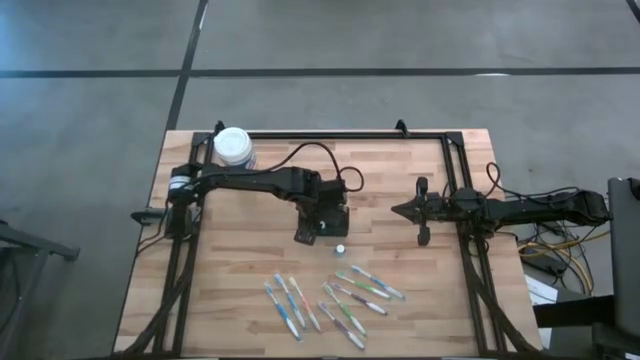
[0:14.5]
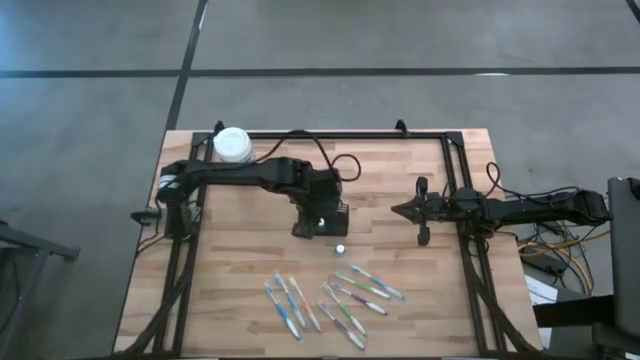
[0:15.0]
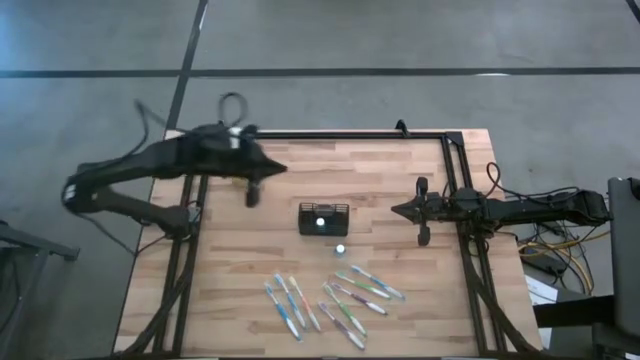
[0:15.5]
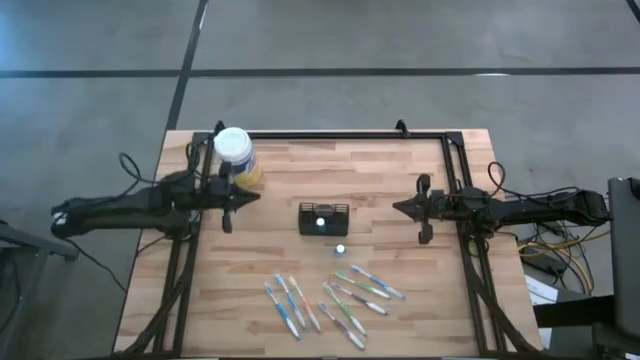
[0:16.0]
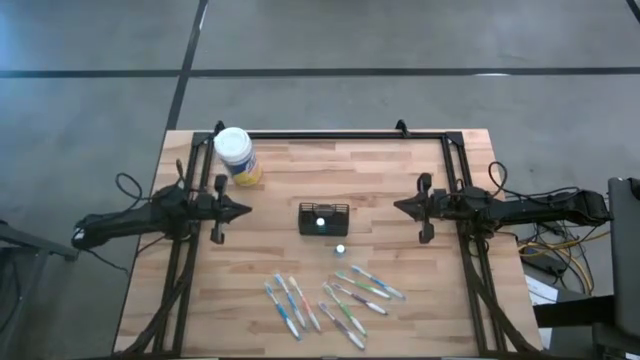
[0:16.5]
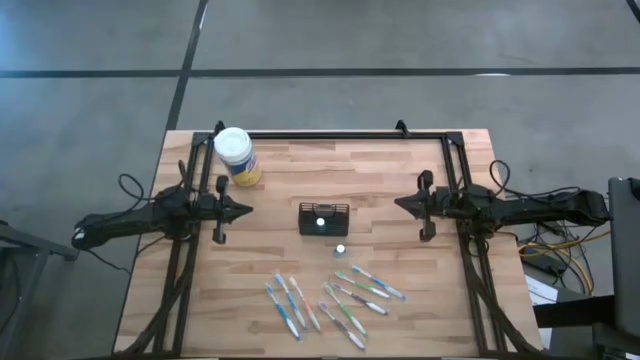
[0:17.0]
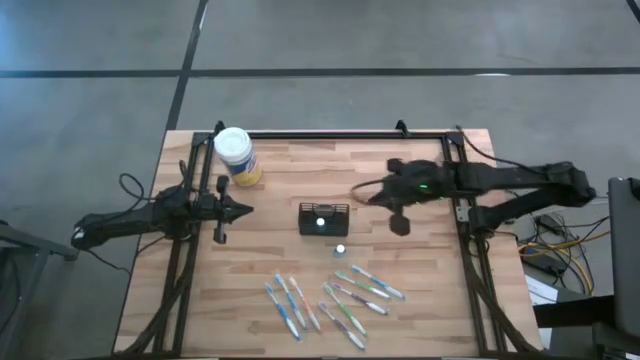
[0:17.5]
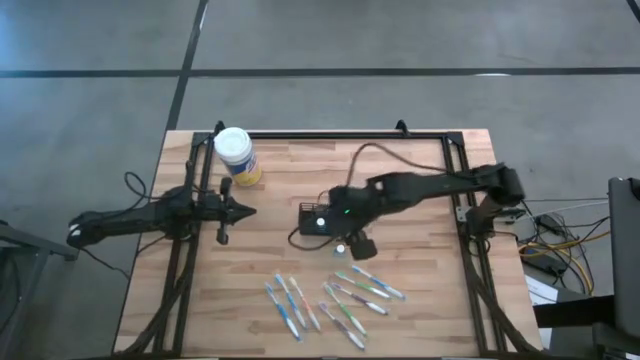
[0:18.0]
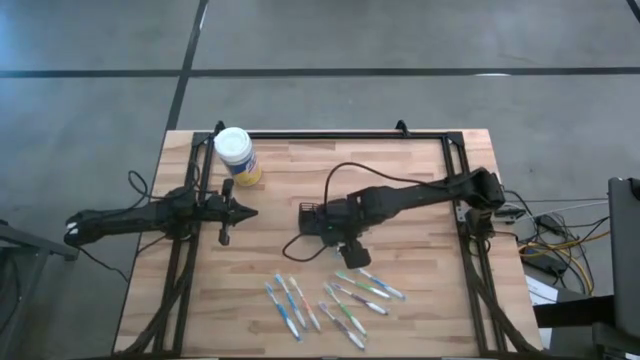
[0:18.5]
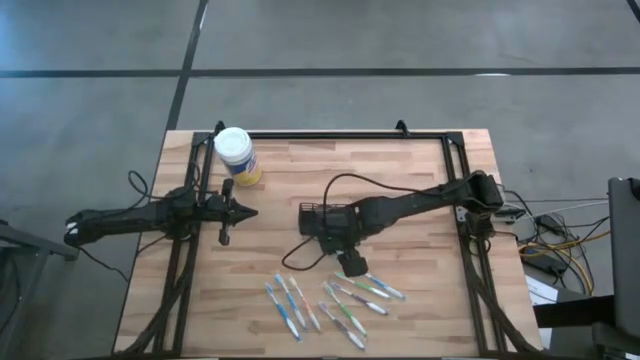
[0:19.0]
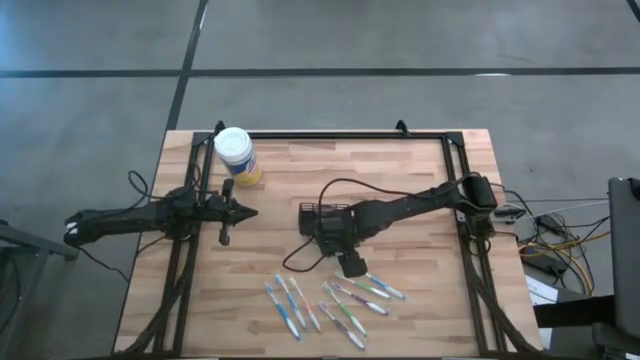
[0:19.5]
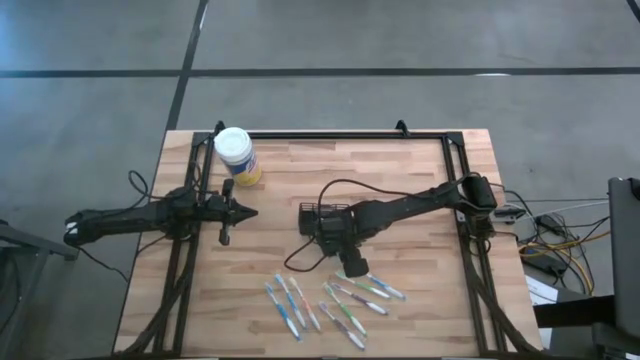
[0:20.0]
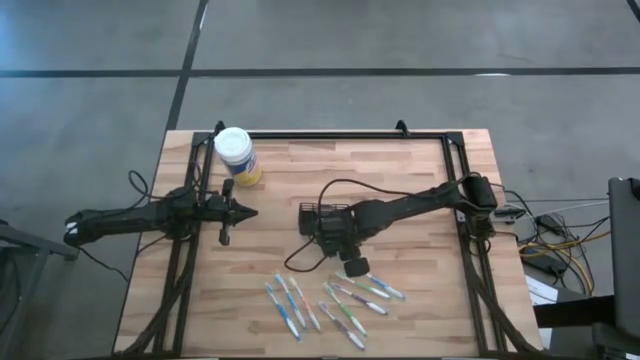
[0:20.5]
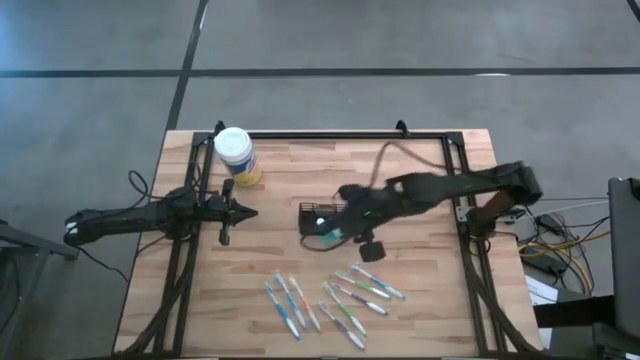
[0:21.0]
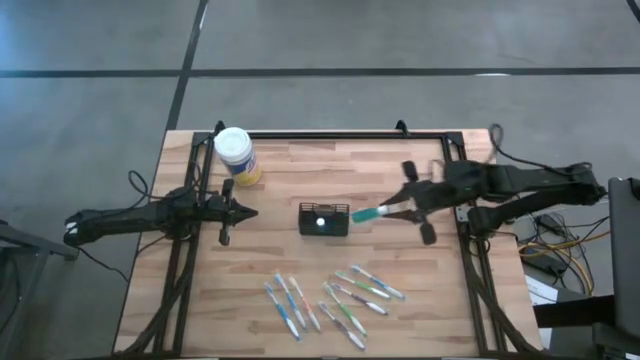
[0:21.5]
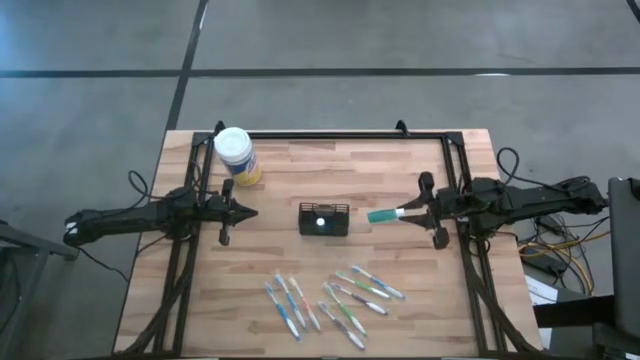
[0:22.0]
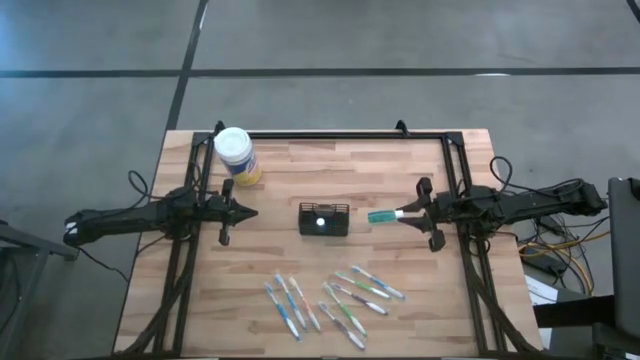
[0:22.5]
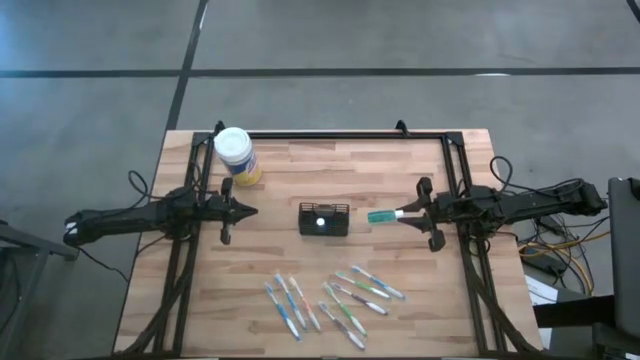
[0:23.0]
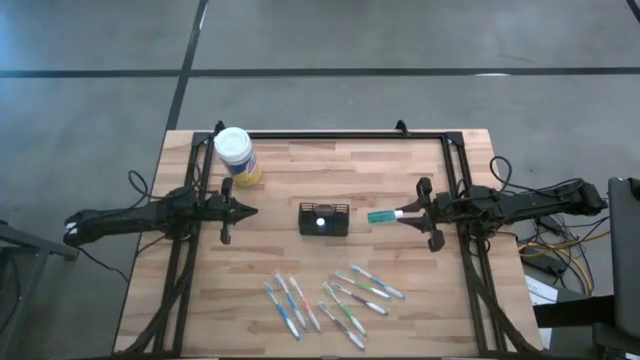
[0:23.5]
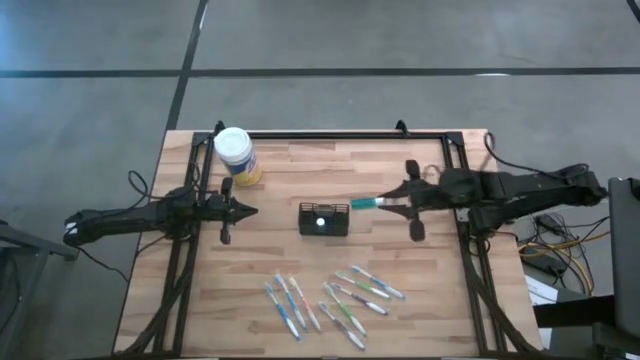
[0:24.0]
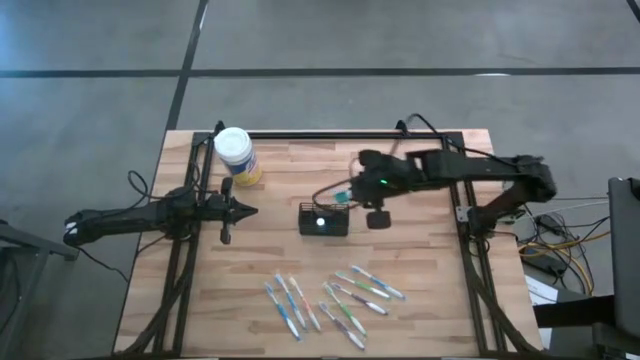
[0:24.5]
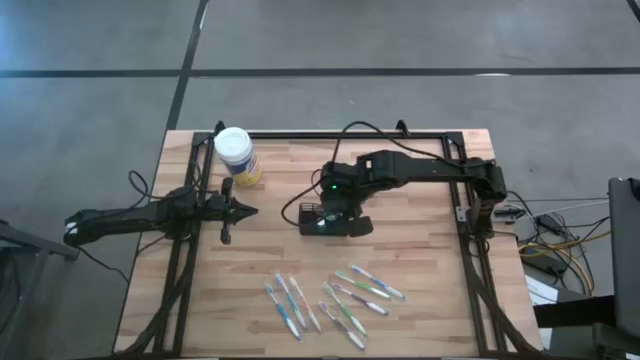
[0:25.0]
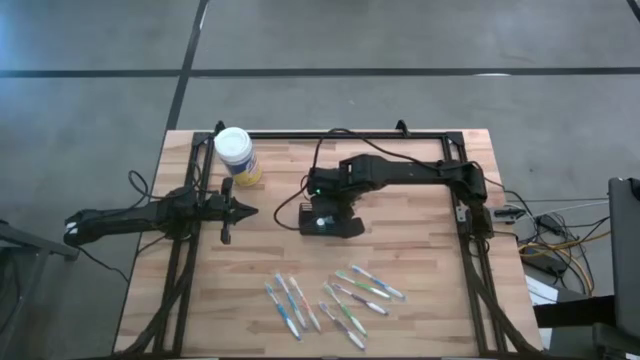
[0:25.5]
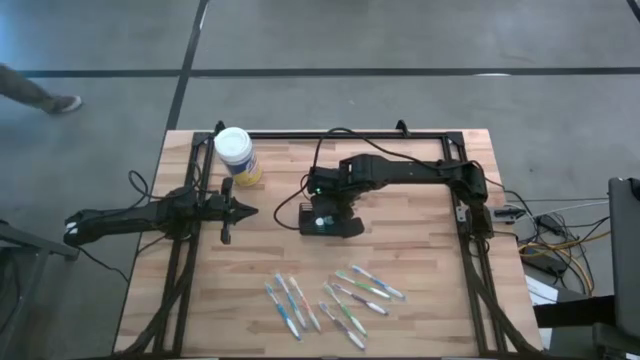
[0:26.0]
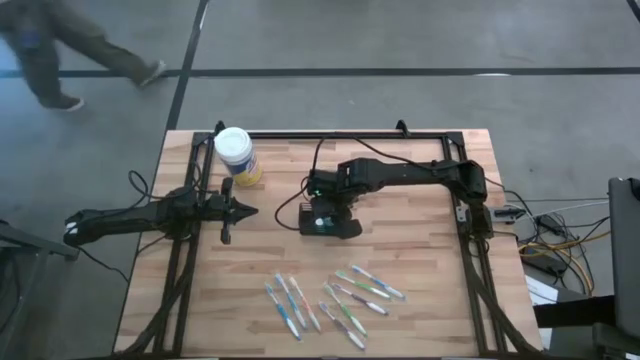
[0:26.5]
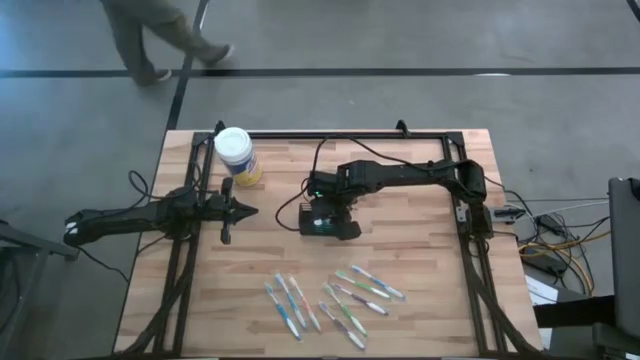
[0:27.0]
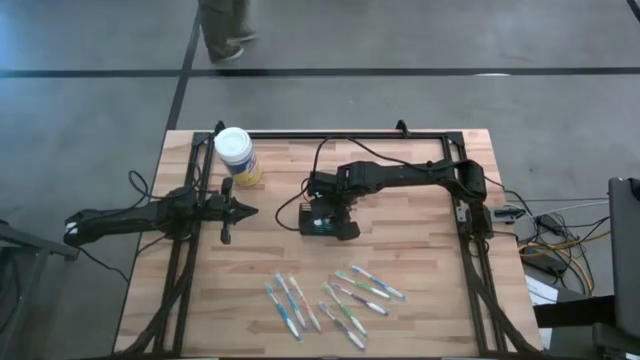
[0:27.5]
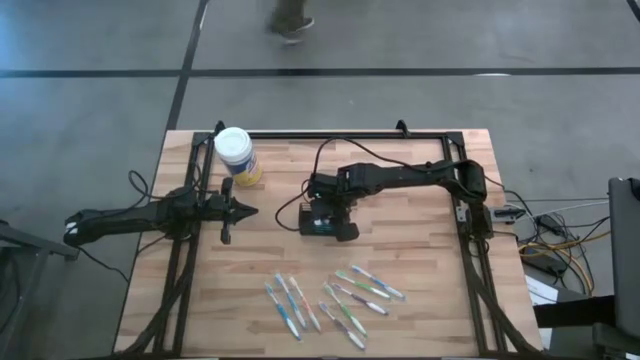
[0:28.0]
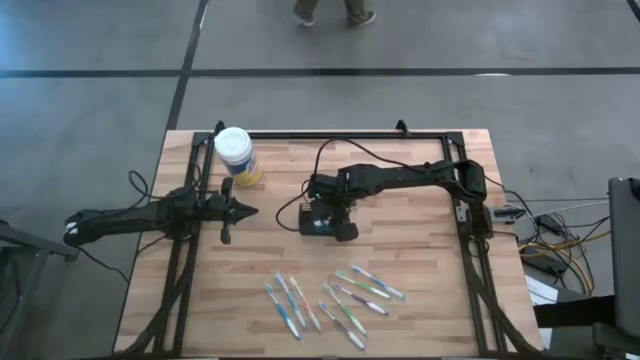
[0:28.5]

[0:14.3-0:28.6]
Task: Pick & Place toothbrushing station
Put the blue mouthwash into the wire organizer
